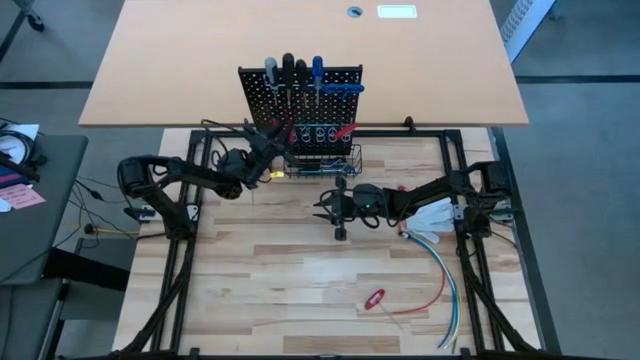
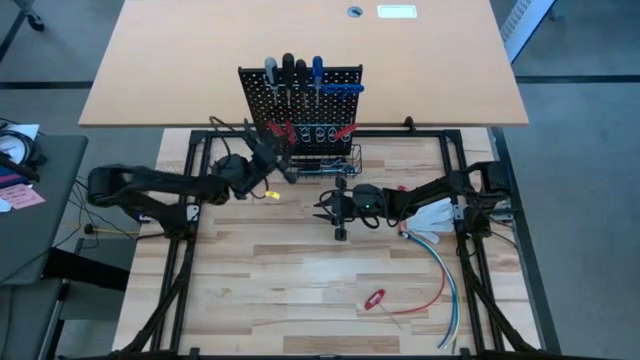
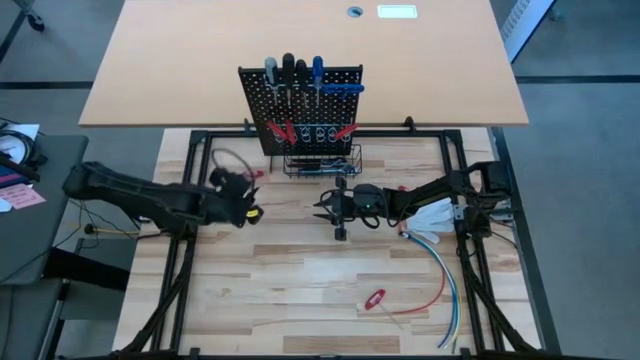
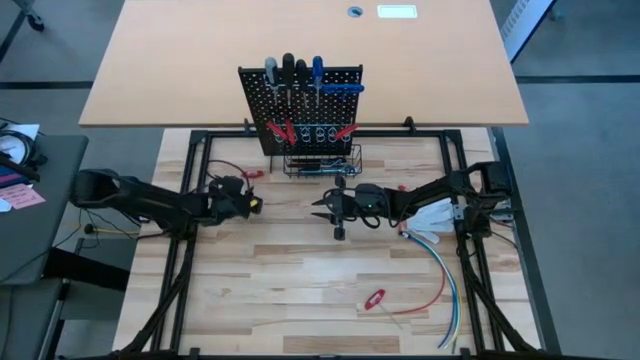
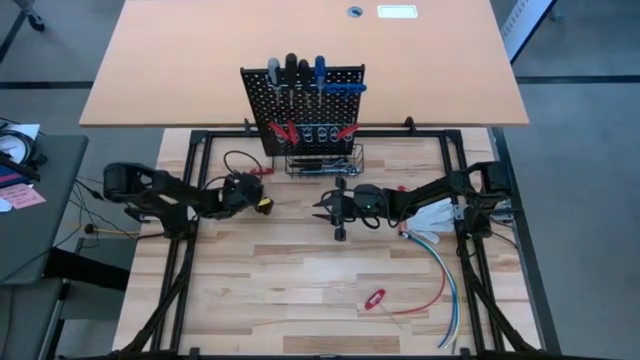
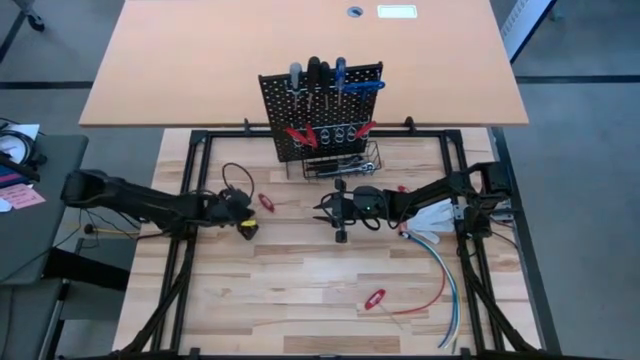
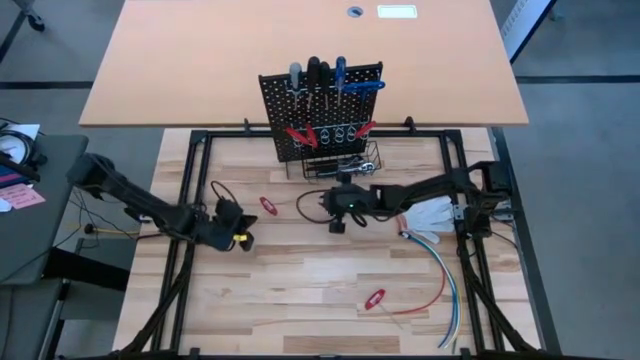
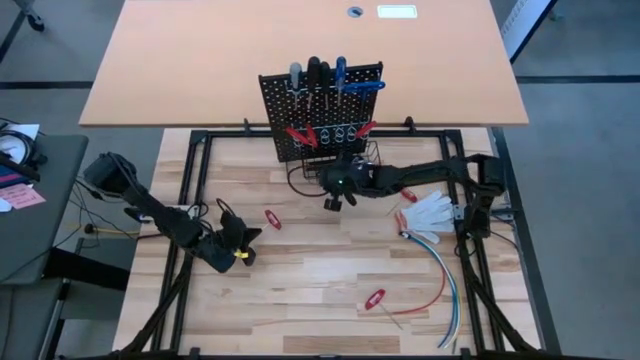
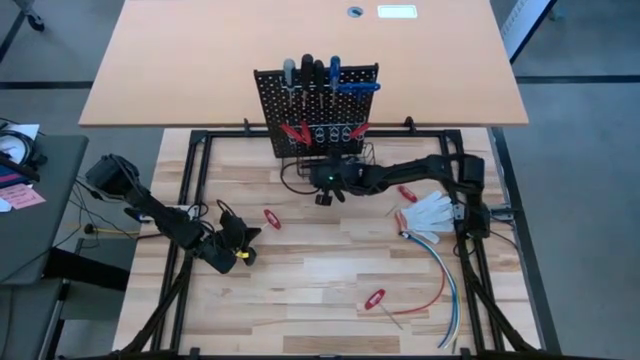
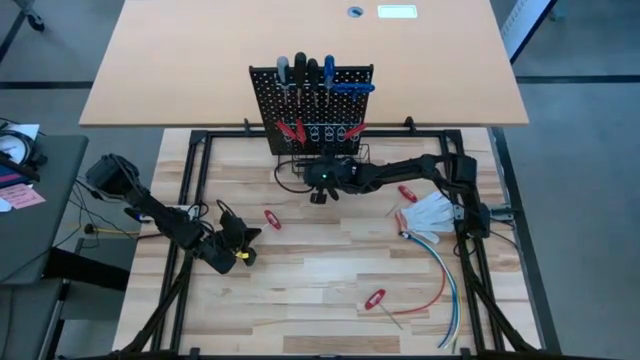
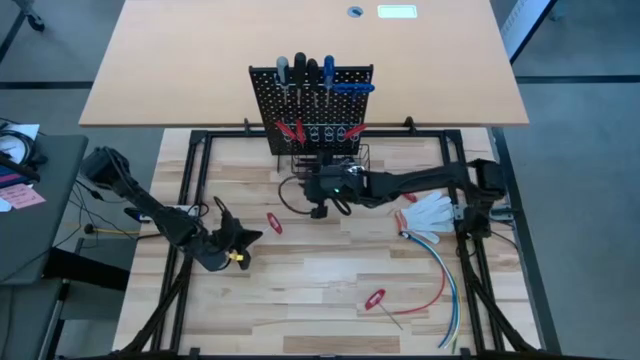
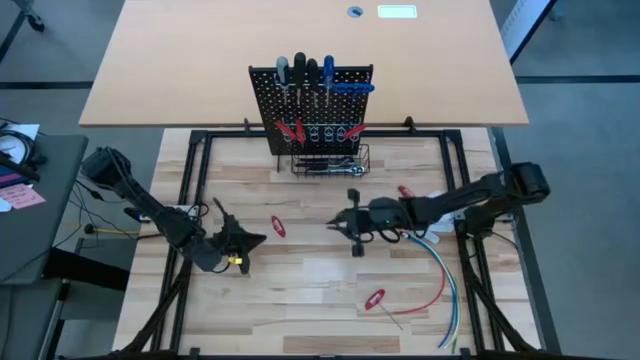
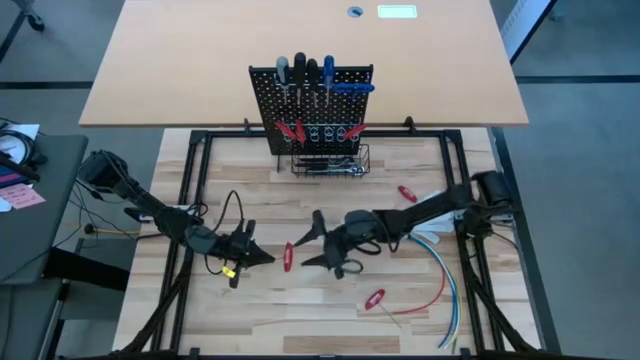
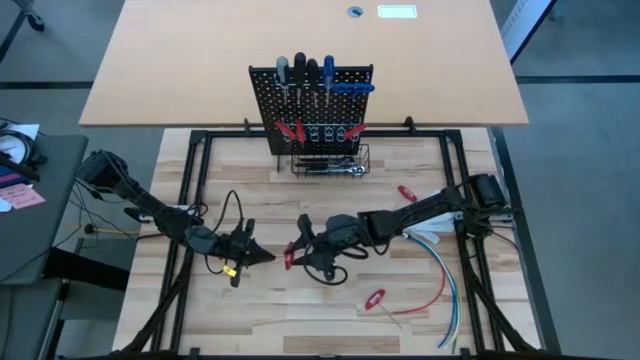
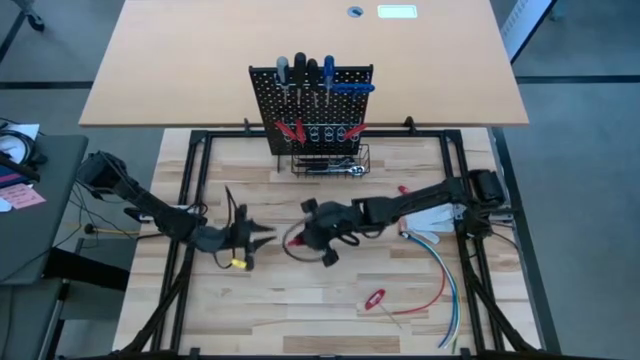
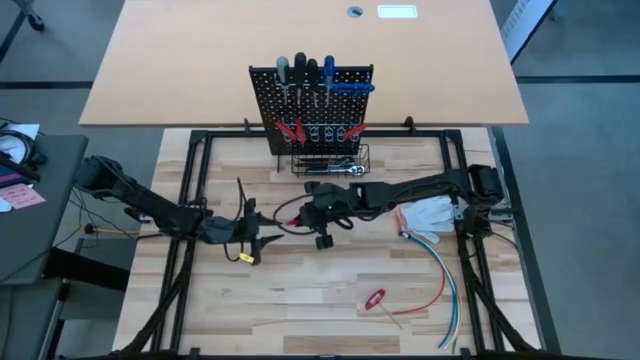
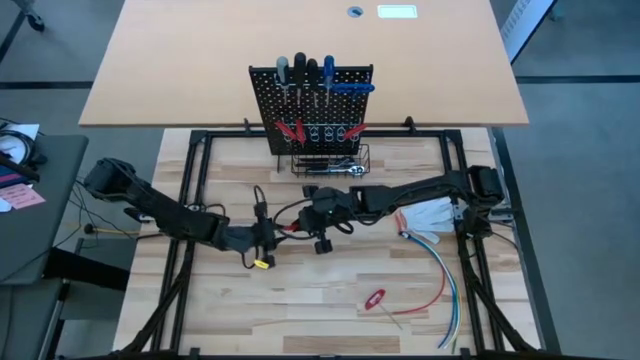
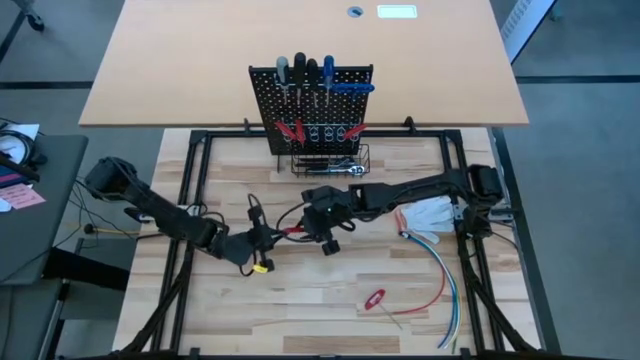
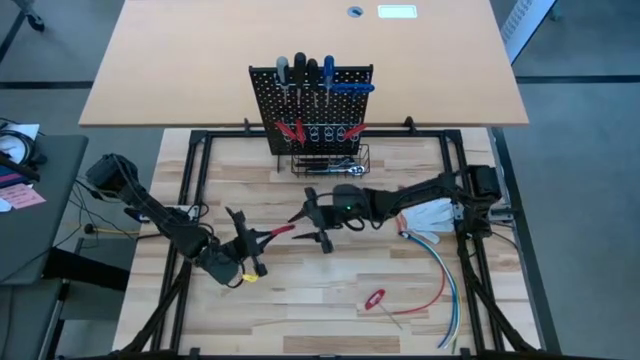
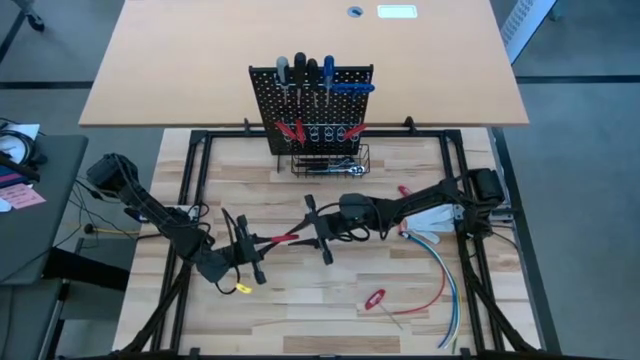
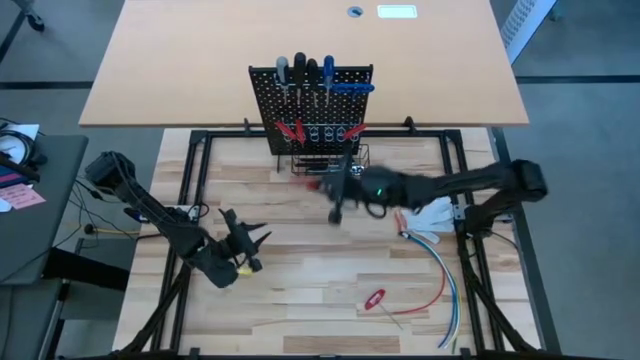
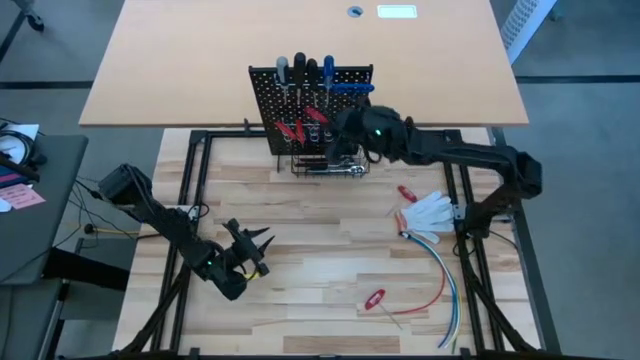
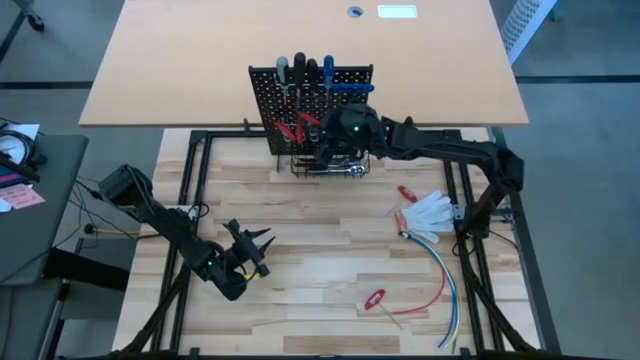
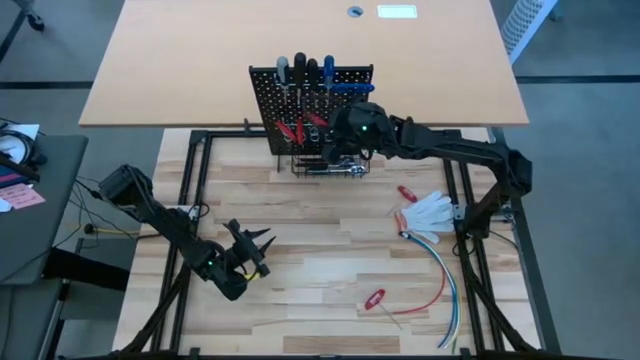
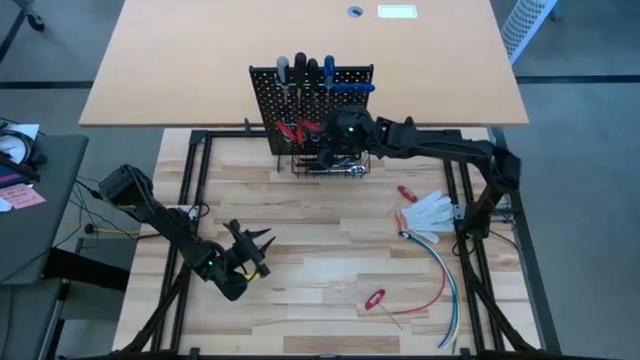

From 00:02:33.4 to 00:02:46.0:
Task: Hang tools onto peg board
Hang the red allen wrench on the pegboard

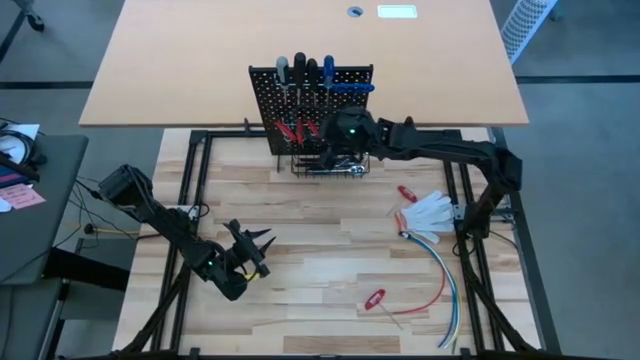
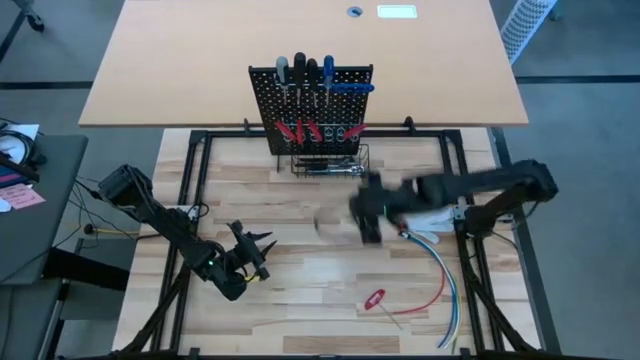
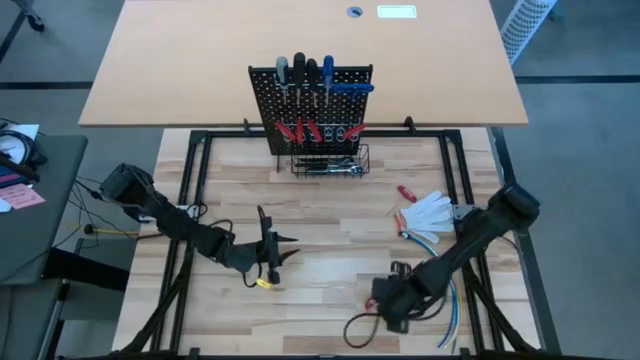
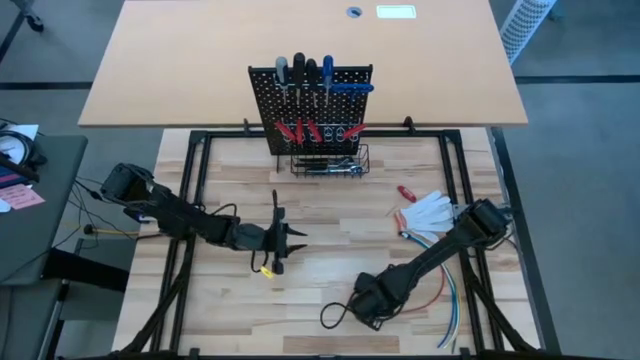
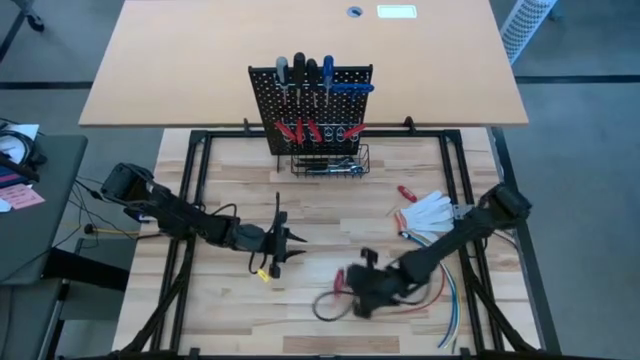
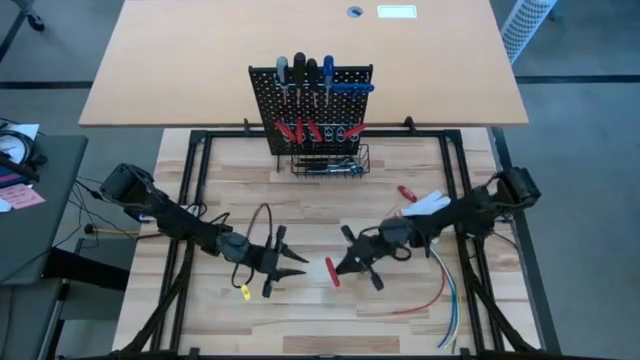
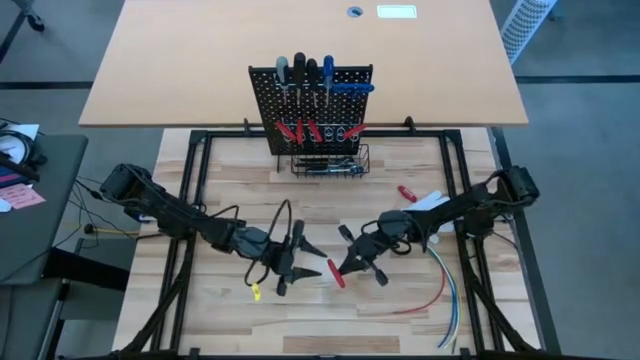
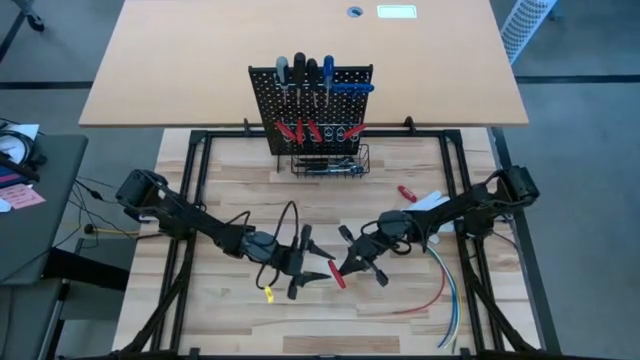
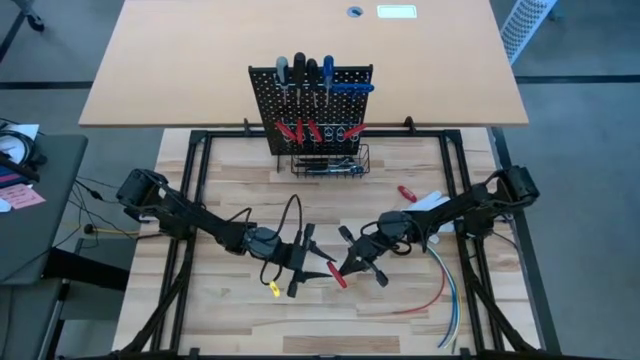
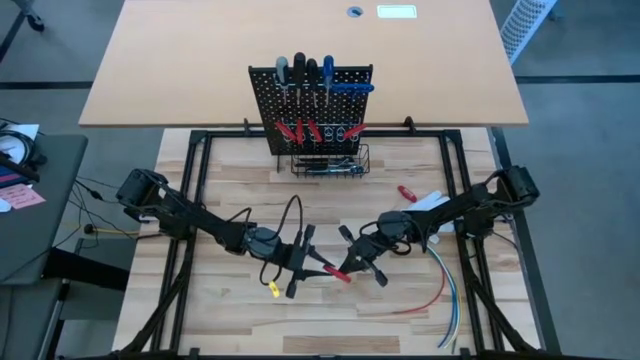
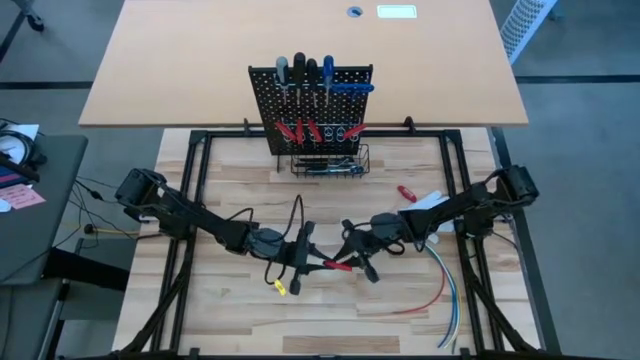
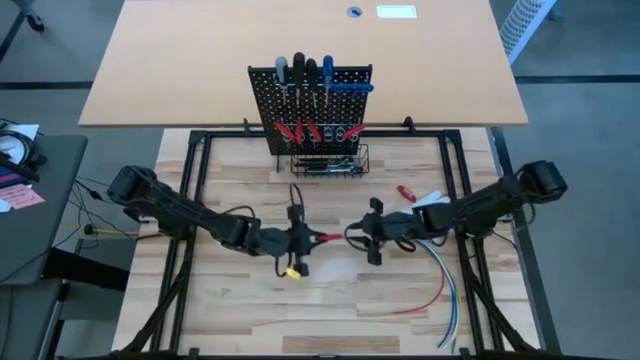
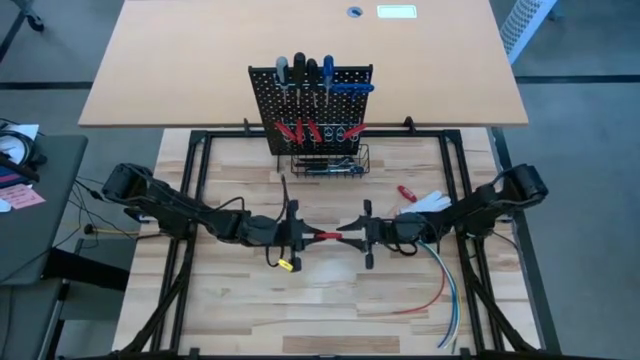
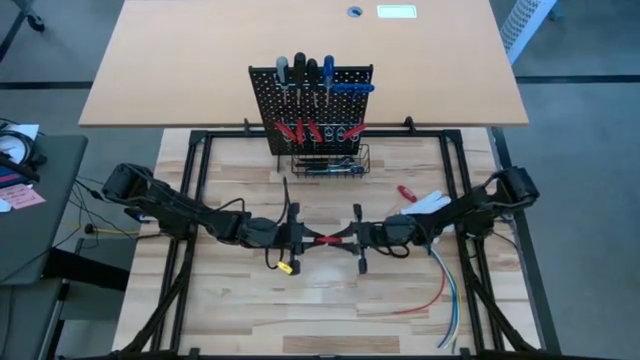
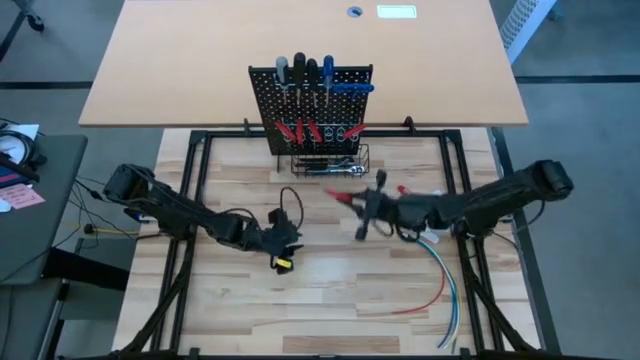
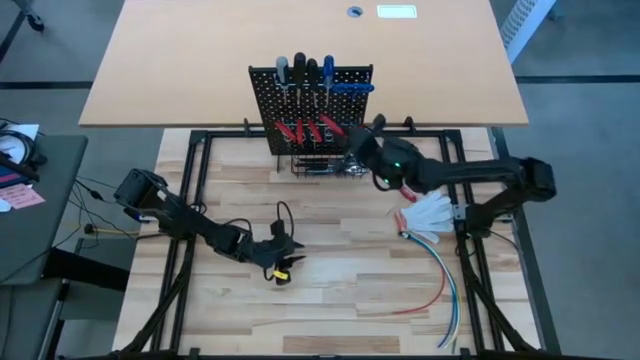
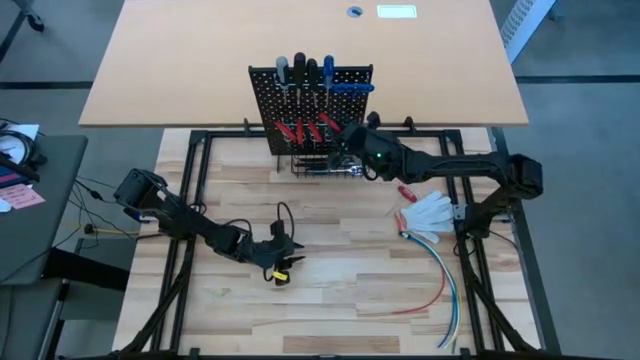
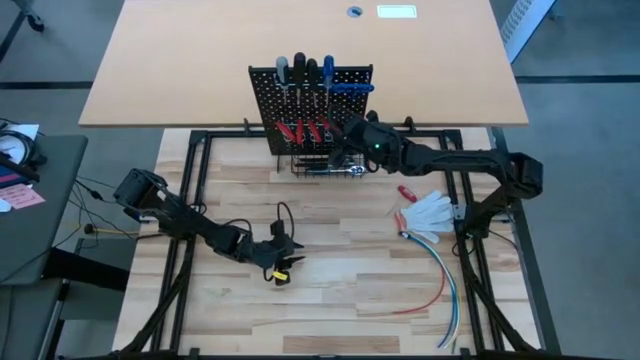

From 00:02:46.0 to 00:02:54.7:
Hang the red allen wrench on the pegboard

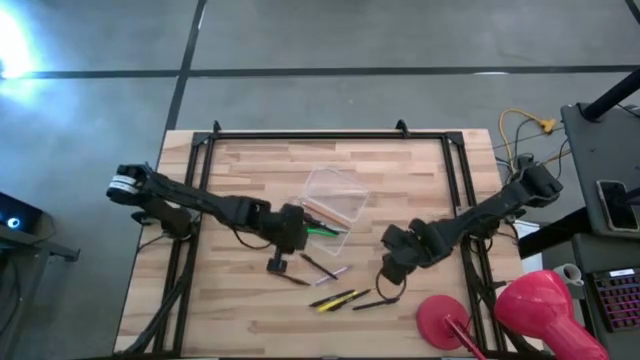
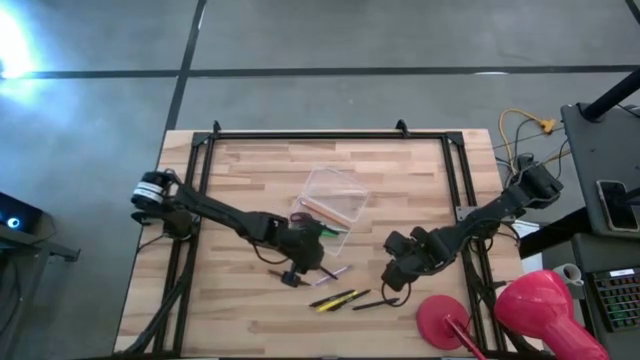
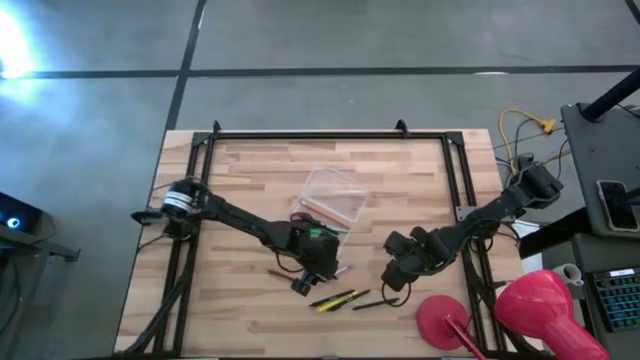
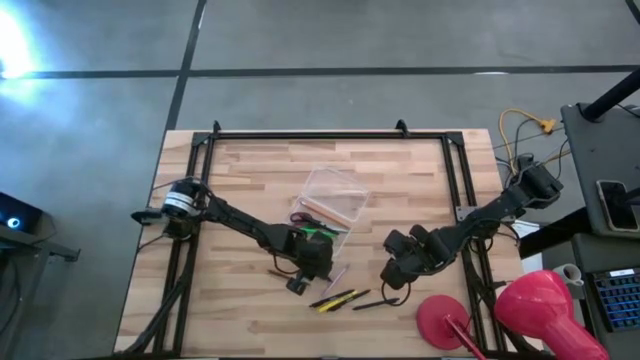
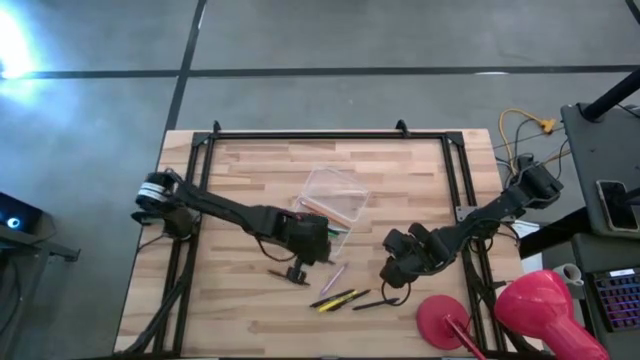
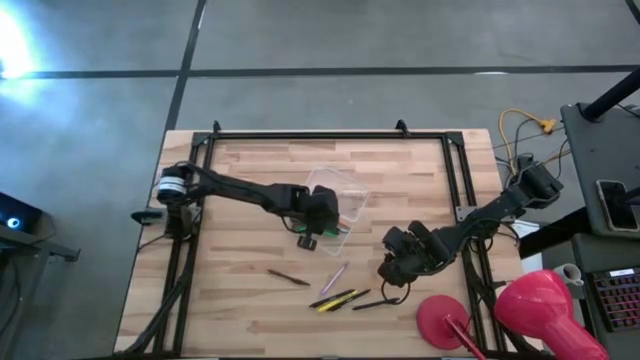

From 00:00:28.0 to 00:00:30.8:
Task: Pick & place school supplies into a supply box
Put the black pen into the transparent case
